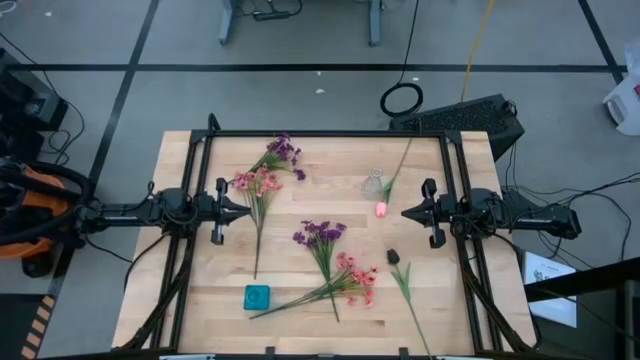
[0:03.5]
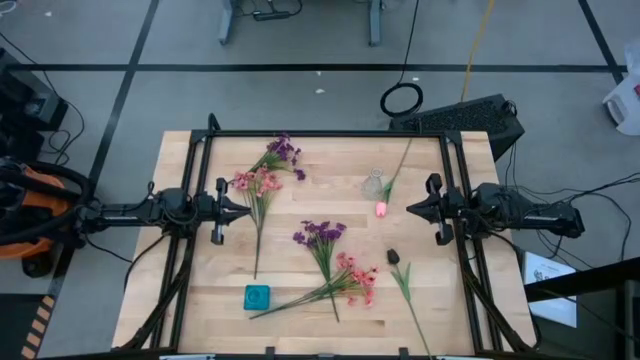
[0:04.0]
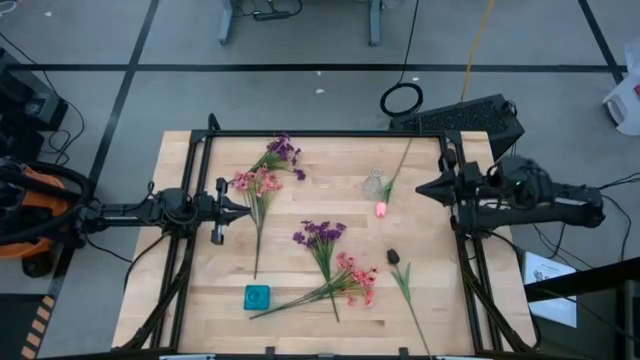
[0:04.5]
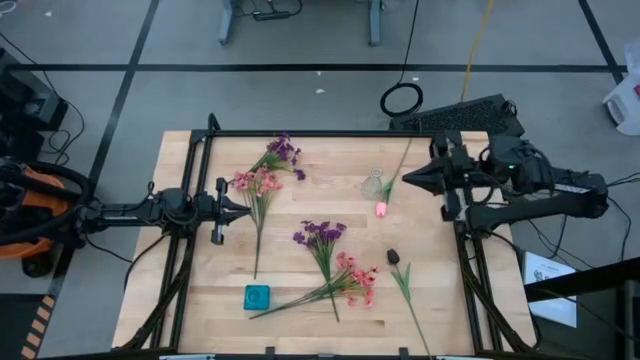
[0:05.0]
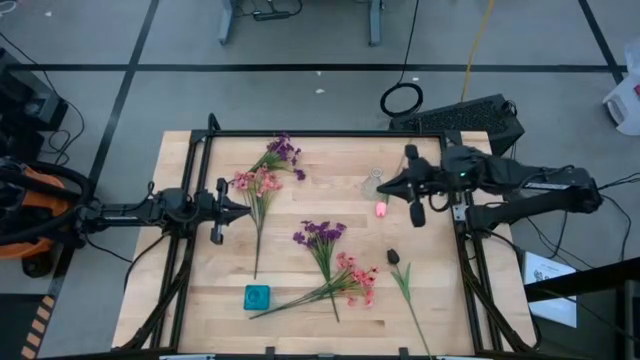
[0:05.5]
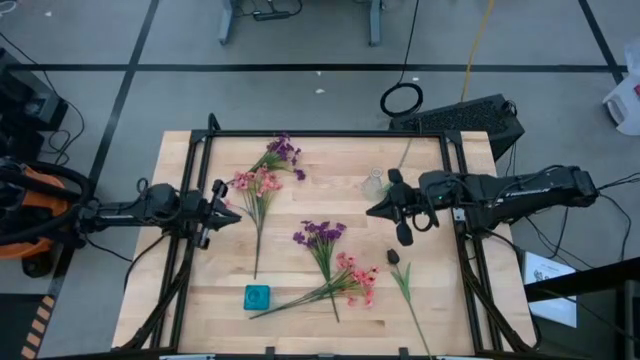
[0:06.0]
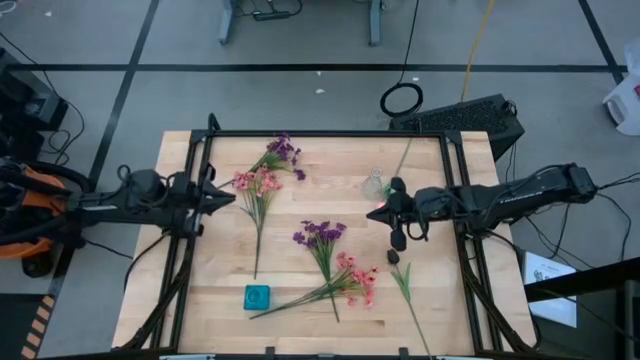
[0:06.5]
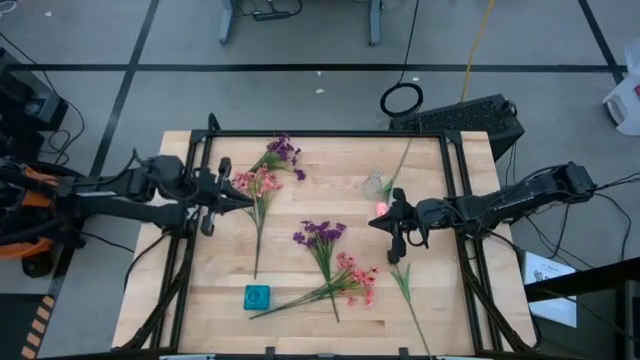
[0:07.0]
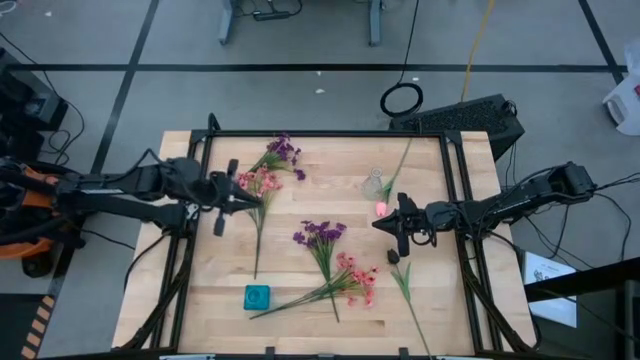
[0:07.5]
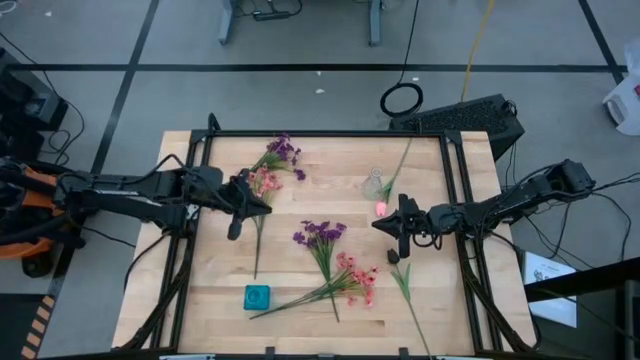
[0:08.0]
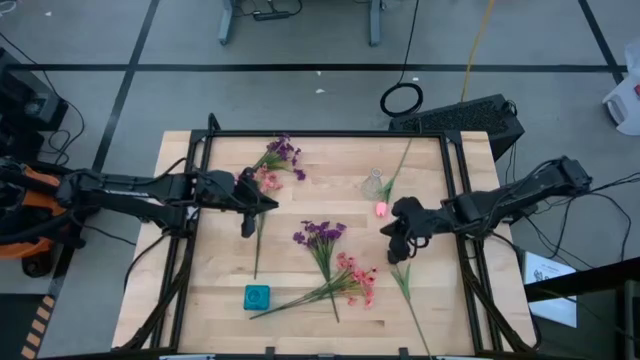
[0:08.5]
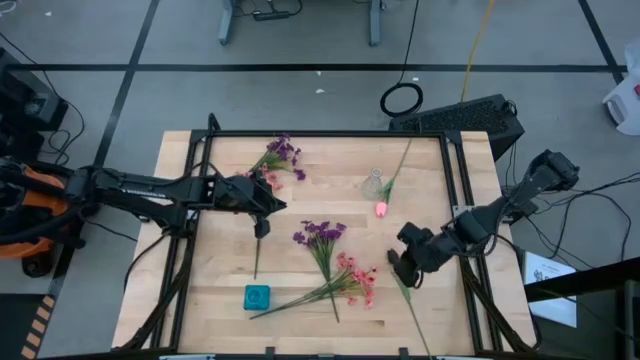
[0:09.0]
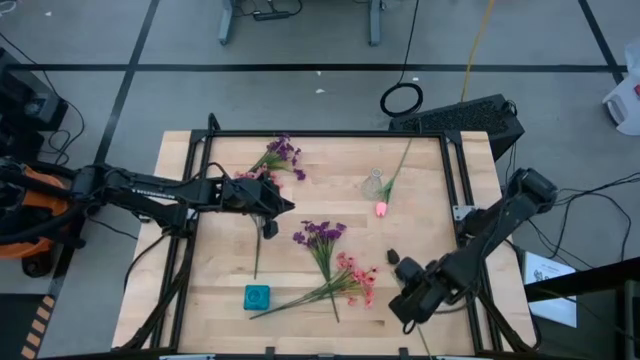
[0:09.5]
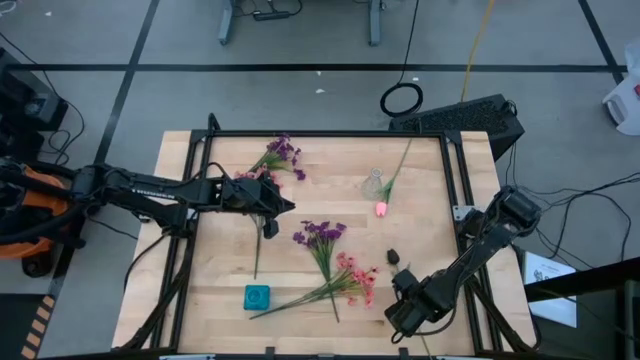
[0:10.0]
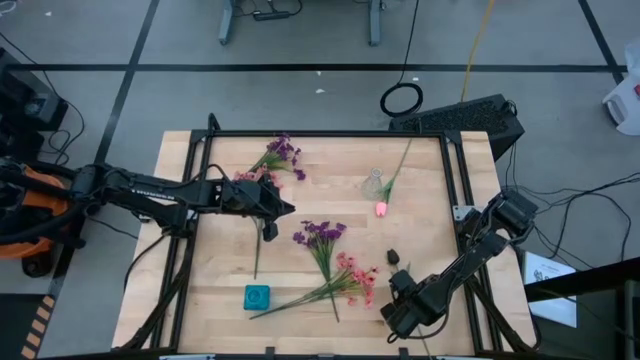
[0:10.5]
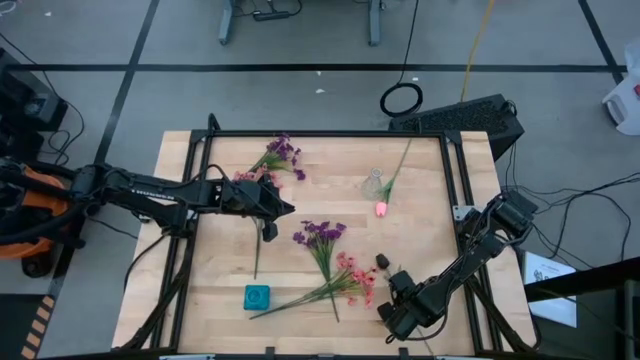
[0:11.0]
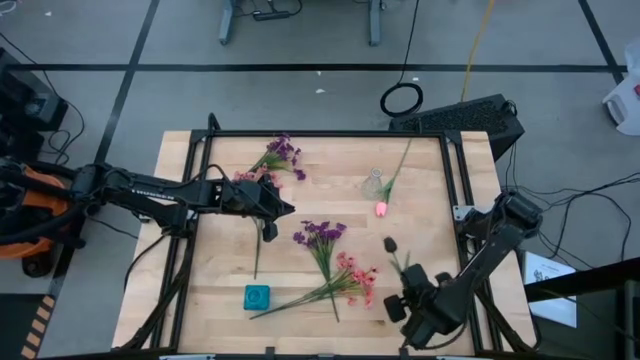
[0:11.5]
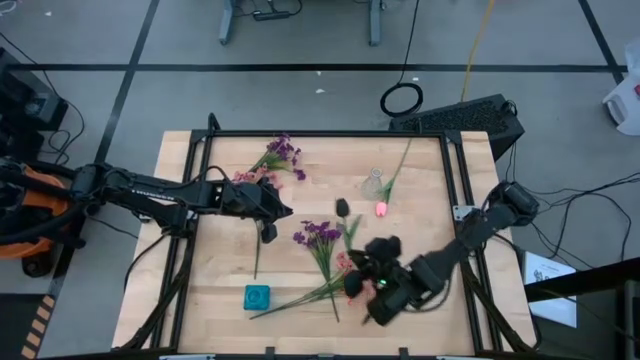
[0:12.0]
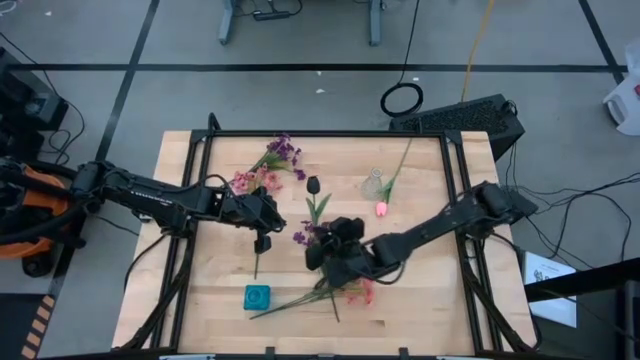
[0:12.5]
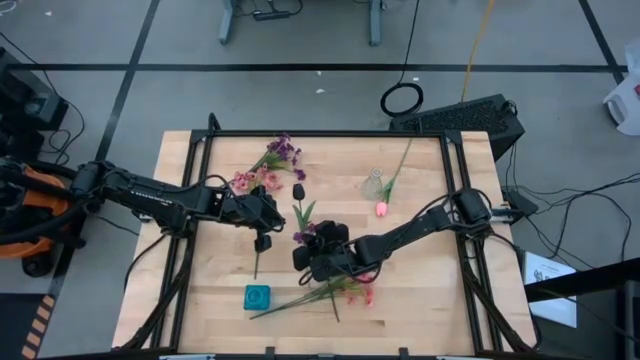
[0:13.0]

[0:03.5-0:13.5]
Task: Sort flowers into vase by color
Move the black tulip to the center of the table

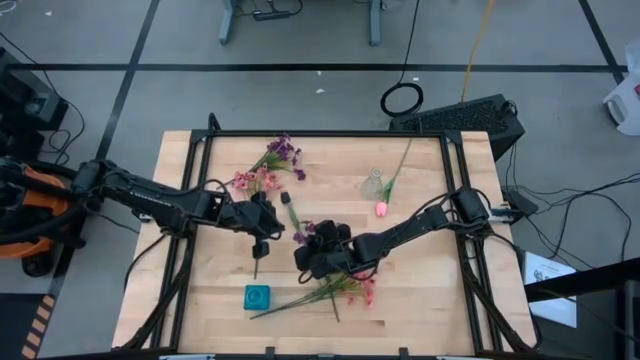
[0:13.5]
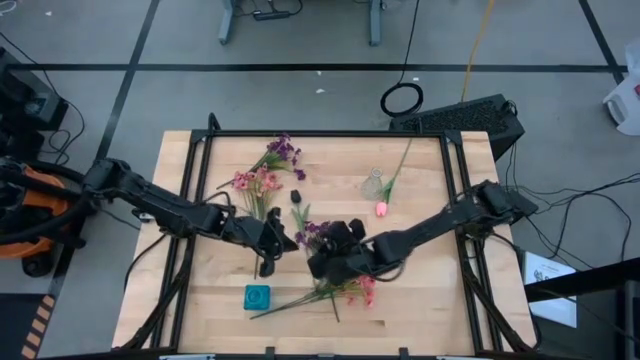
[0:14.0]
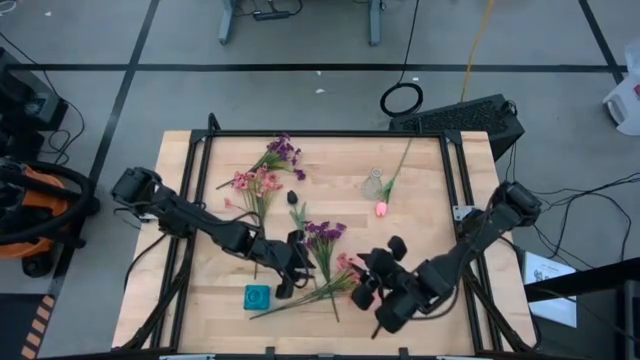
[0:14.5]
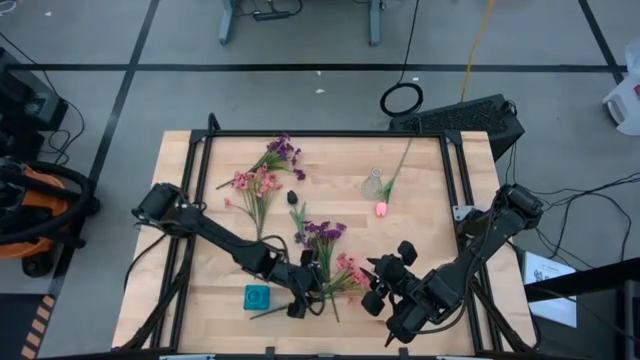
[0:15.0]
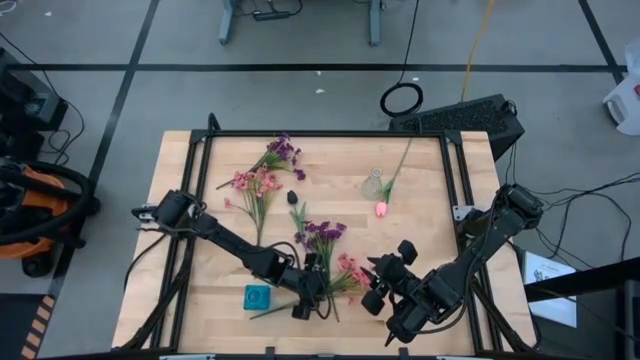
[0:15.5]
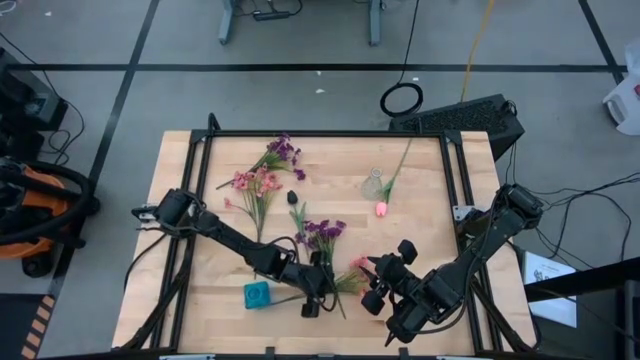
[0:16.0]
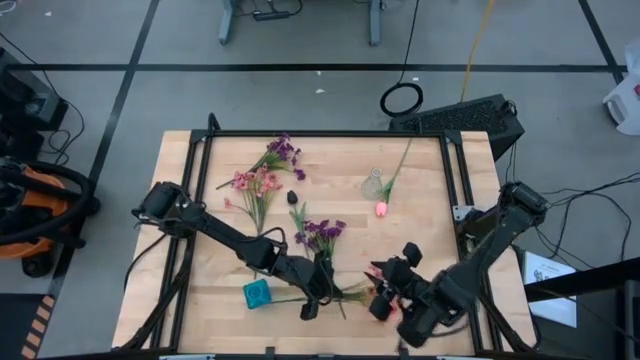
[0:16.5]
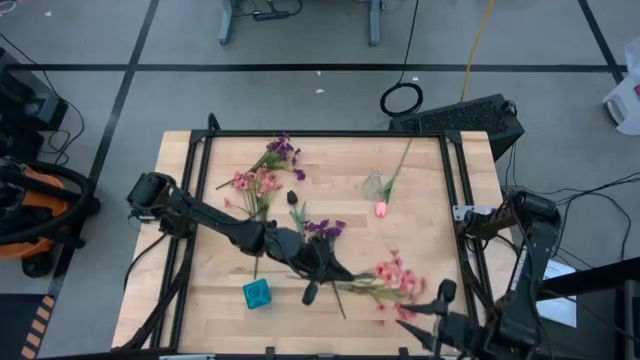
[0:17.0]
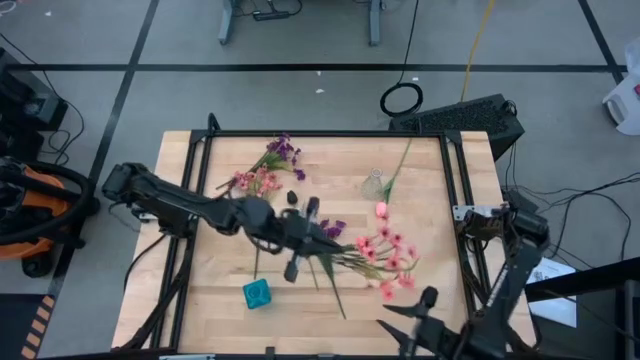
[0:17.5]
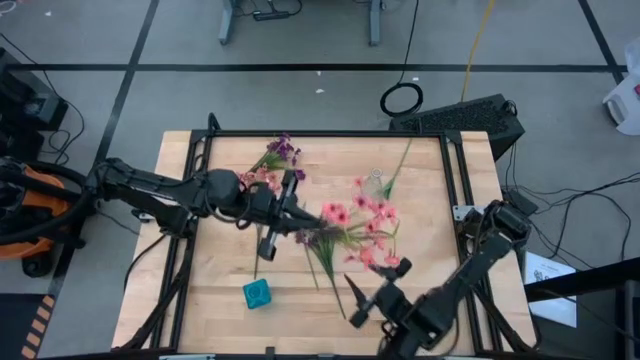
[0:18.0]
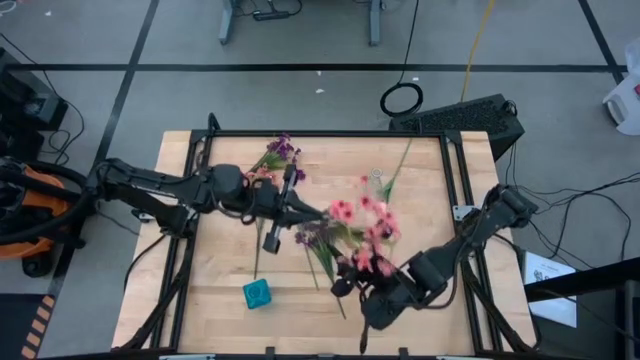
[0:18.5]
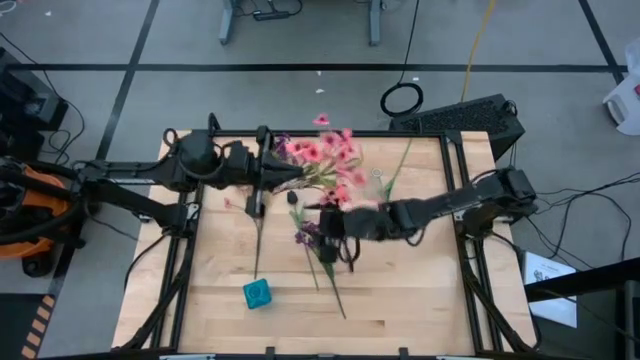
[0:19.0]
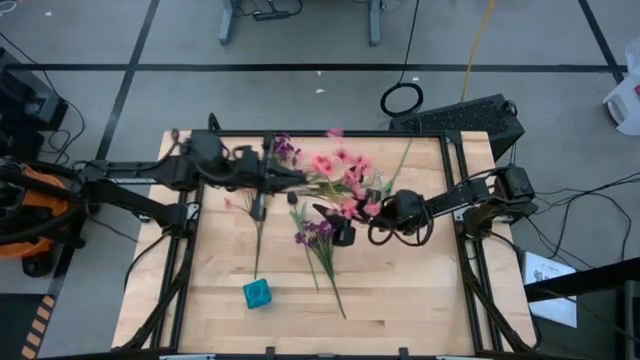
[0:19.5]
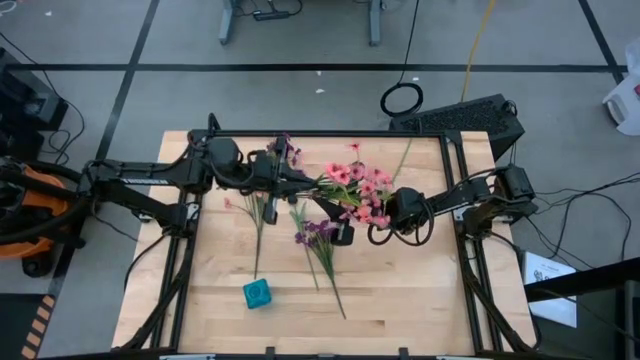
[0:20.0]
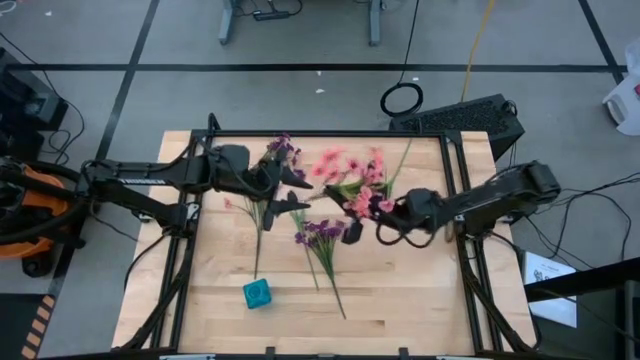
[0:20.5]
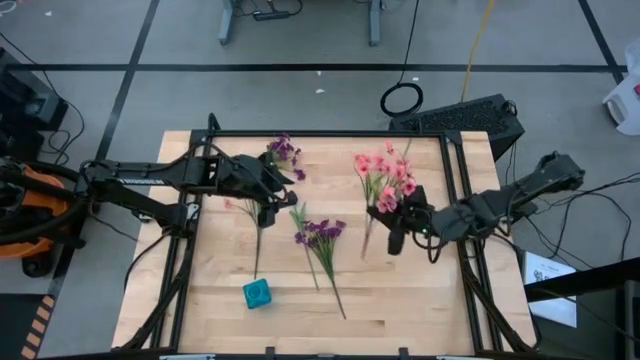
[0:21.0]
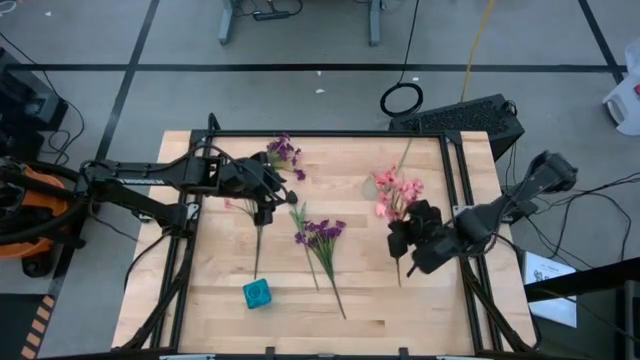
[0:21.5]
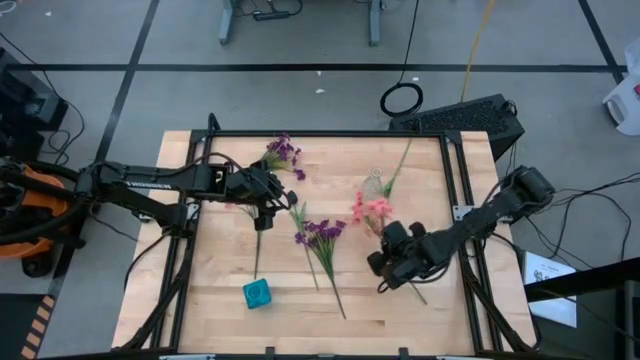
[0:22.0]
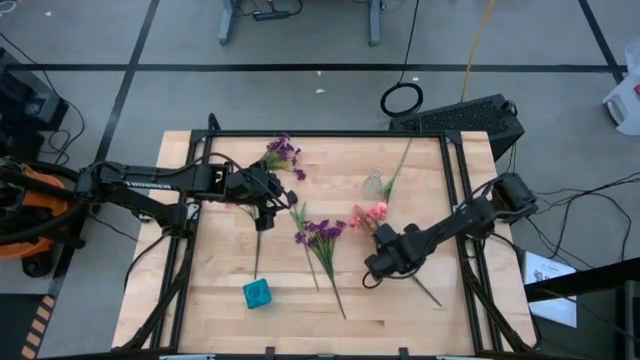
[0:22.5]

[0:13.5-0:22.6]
Move the bottom pink flower to the middle right of the table

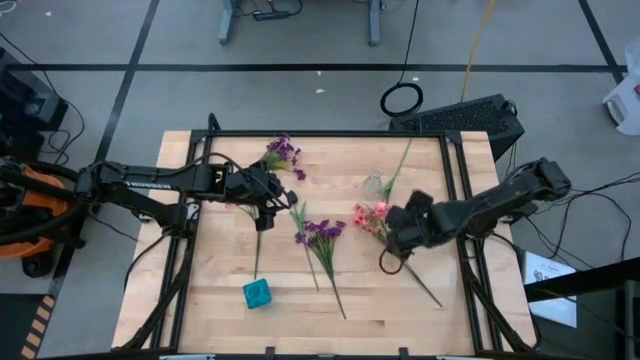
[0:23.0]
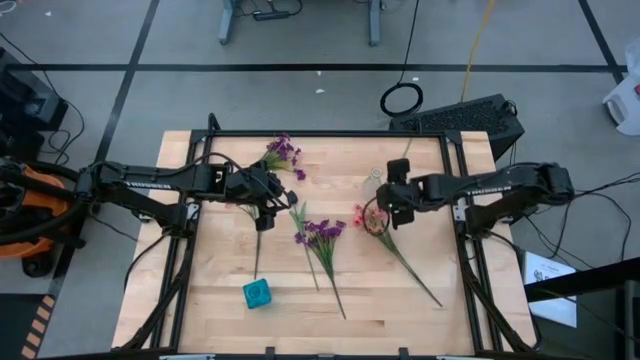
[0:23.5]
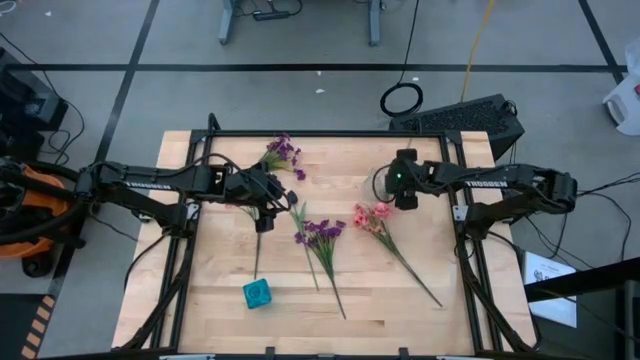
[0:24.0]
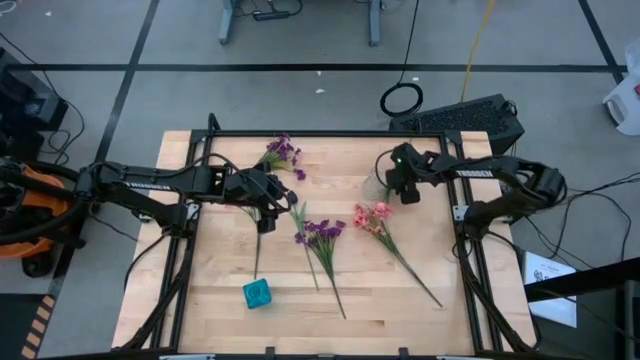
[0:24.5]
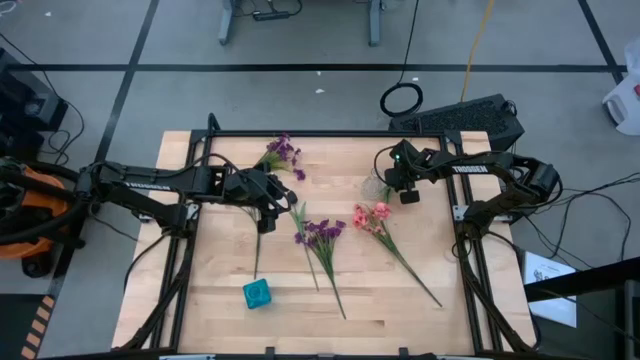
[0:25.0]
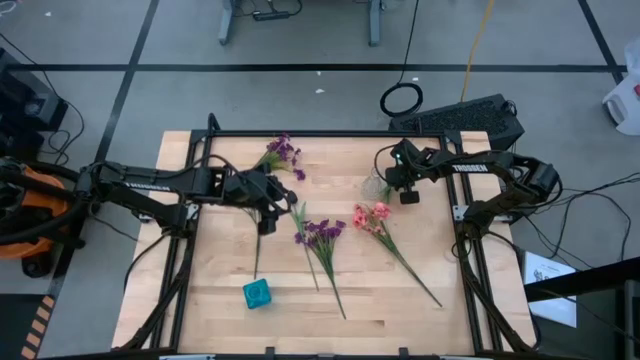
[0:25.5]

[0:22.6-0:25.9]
Move the pink tulip to the middle right of the table
